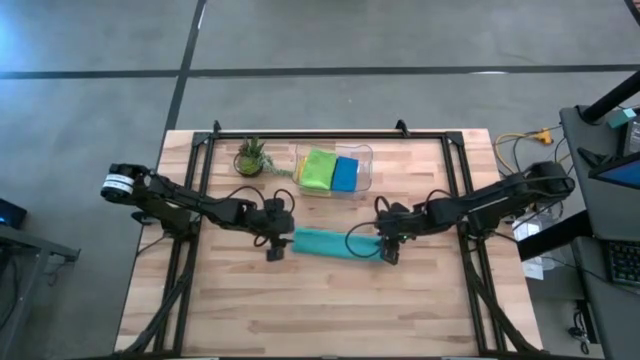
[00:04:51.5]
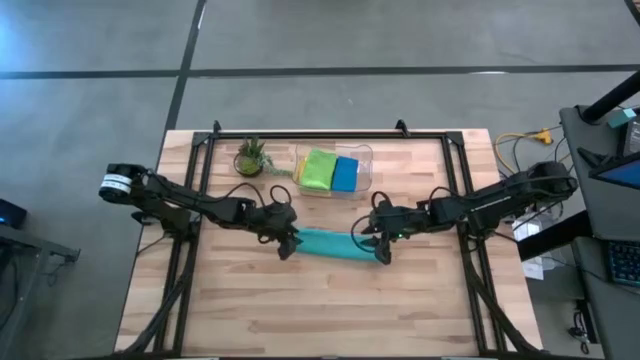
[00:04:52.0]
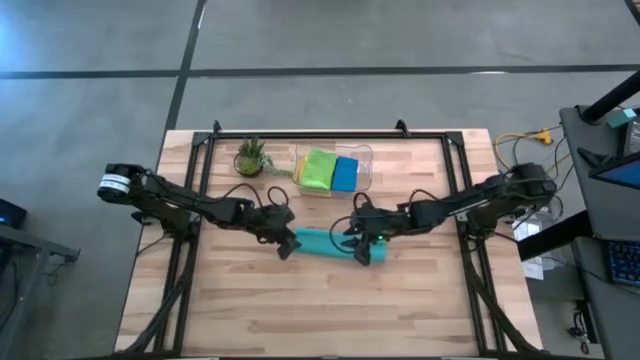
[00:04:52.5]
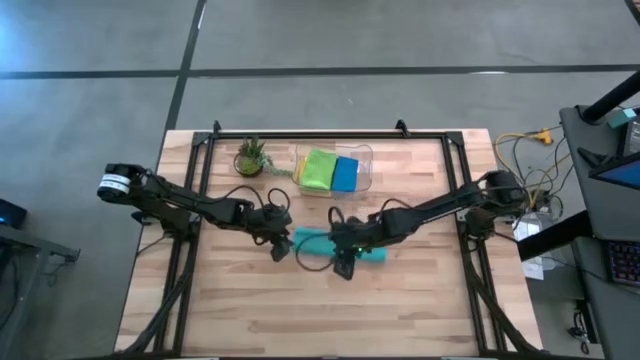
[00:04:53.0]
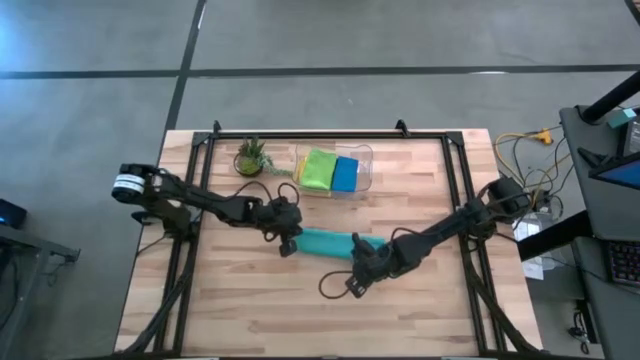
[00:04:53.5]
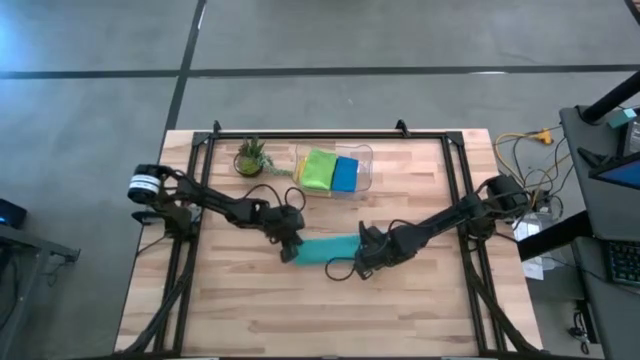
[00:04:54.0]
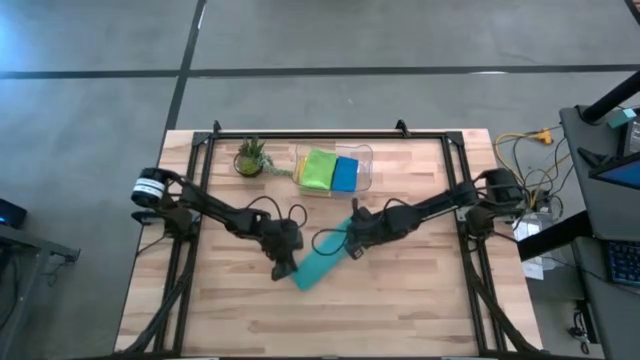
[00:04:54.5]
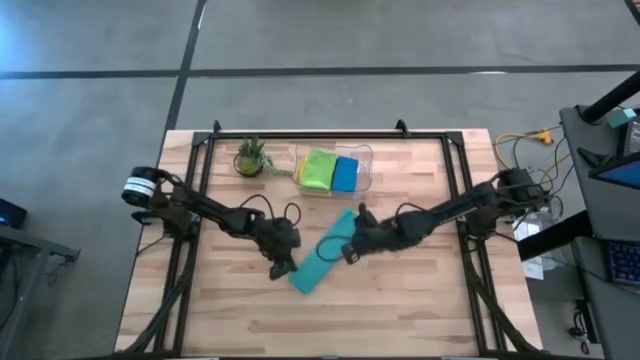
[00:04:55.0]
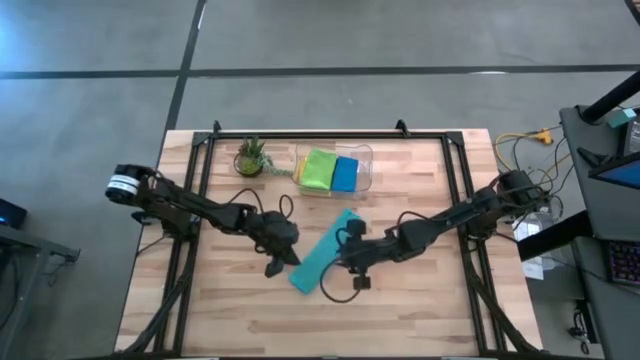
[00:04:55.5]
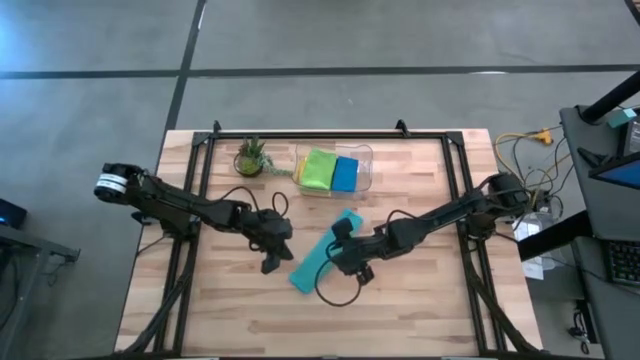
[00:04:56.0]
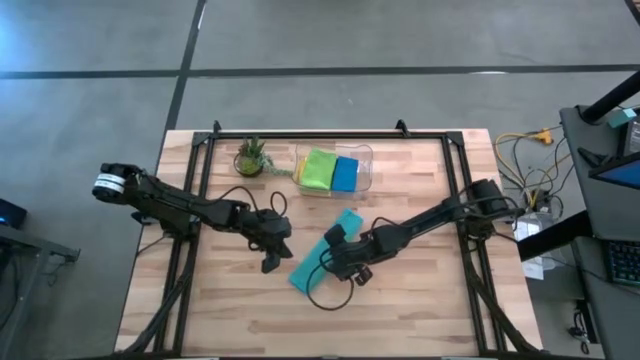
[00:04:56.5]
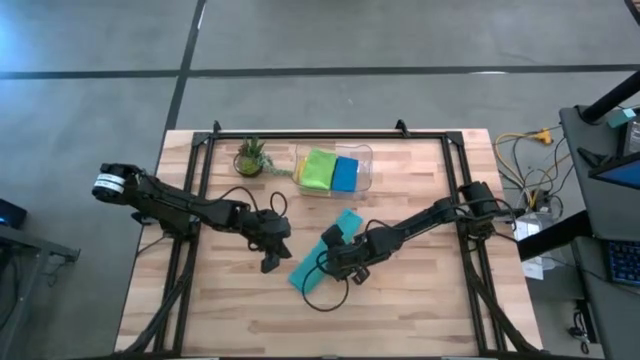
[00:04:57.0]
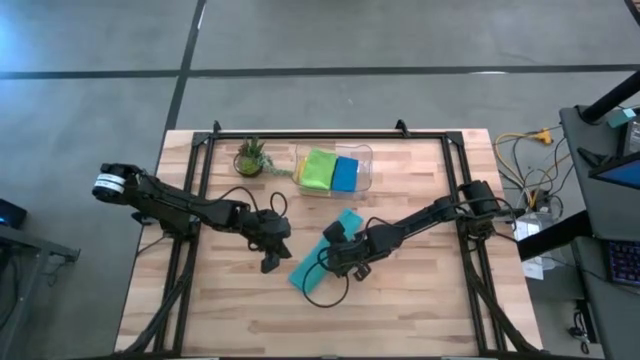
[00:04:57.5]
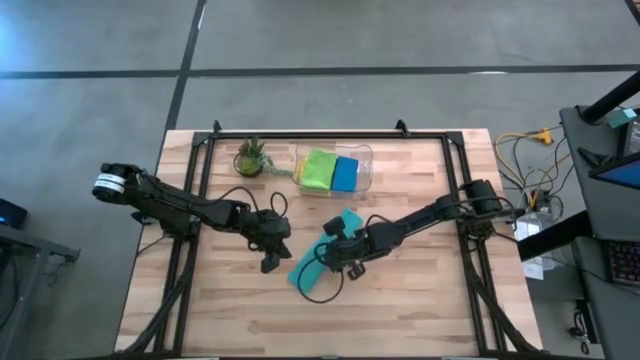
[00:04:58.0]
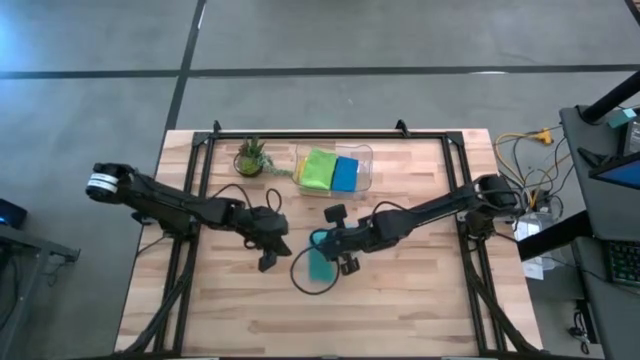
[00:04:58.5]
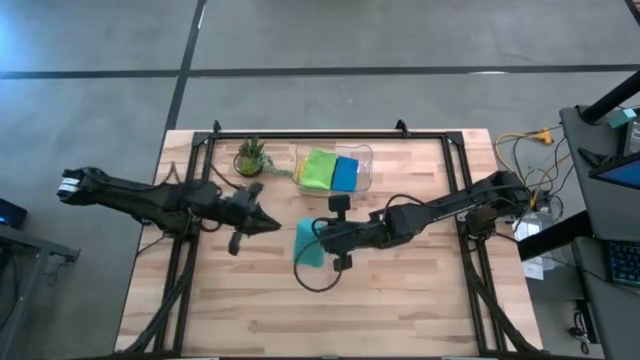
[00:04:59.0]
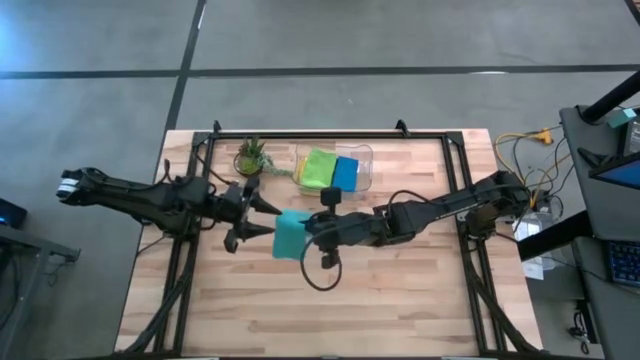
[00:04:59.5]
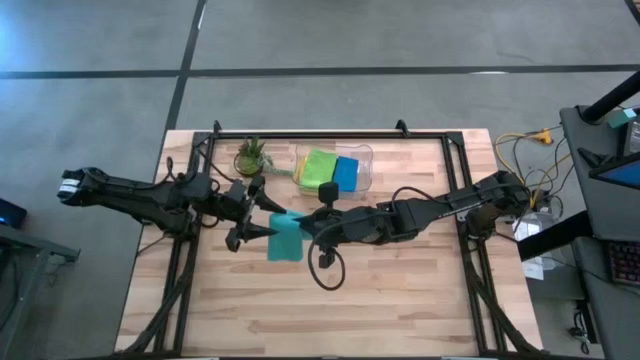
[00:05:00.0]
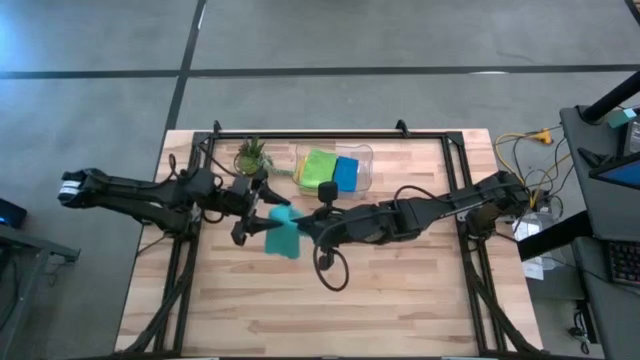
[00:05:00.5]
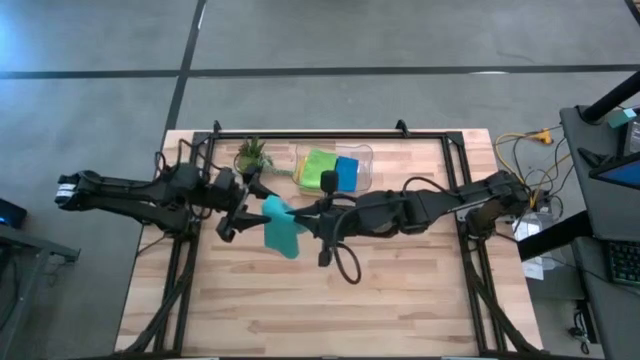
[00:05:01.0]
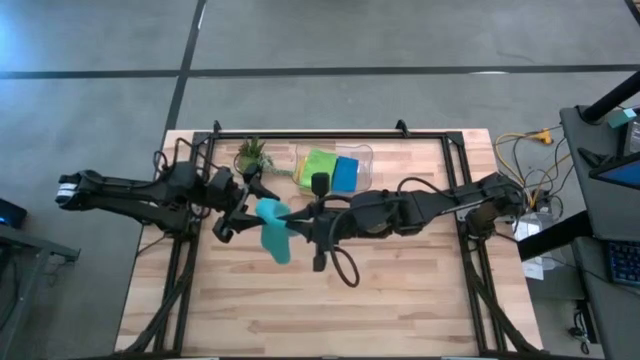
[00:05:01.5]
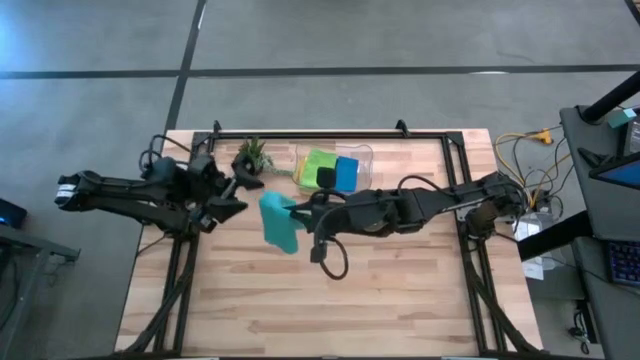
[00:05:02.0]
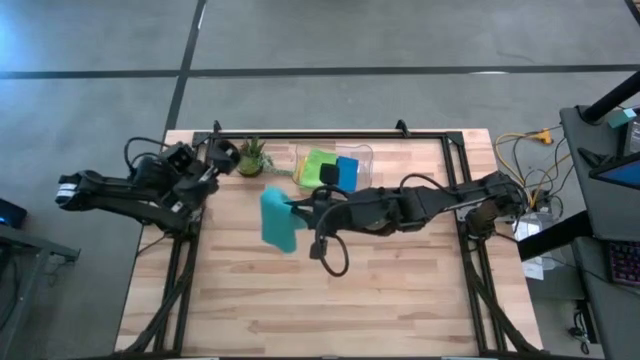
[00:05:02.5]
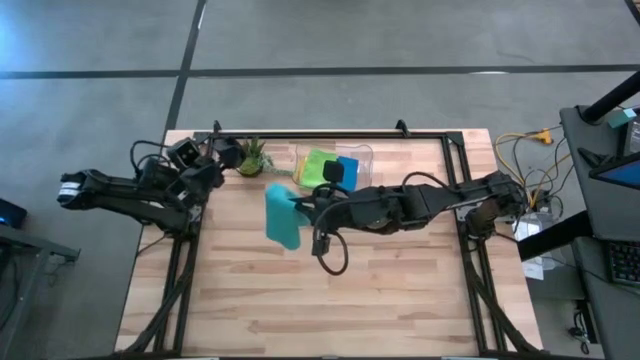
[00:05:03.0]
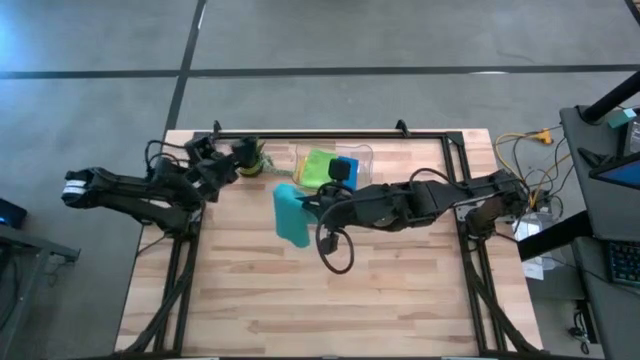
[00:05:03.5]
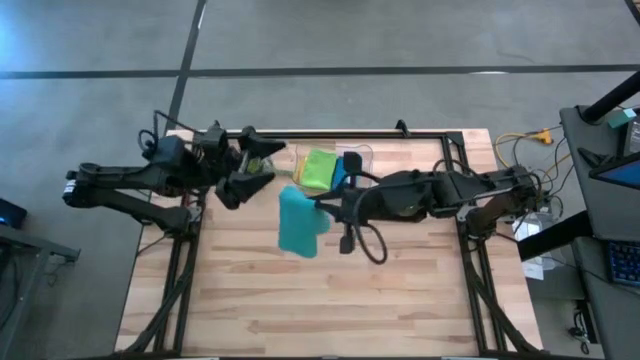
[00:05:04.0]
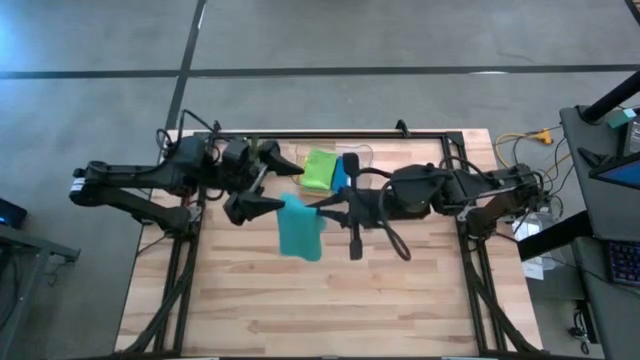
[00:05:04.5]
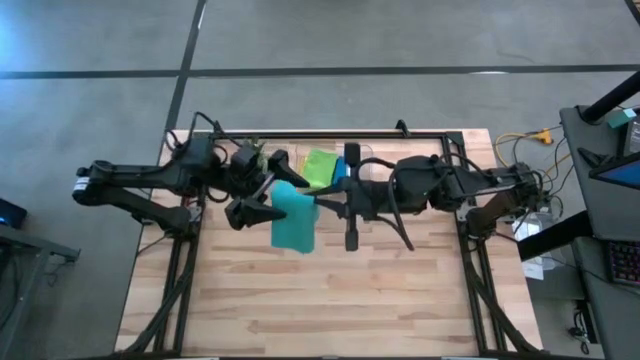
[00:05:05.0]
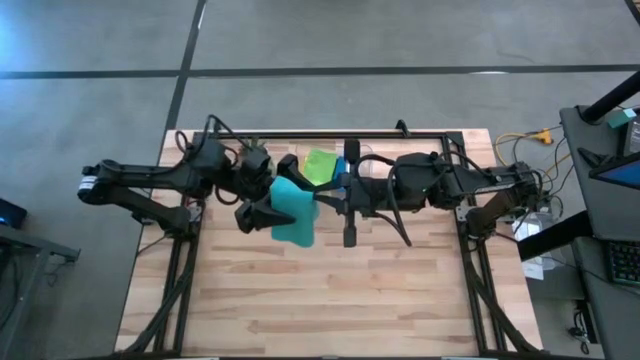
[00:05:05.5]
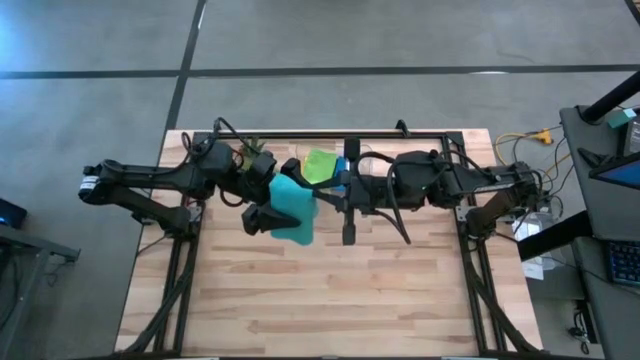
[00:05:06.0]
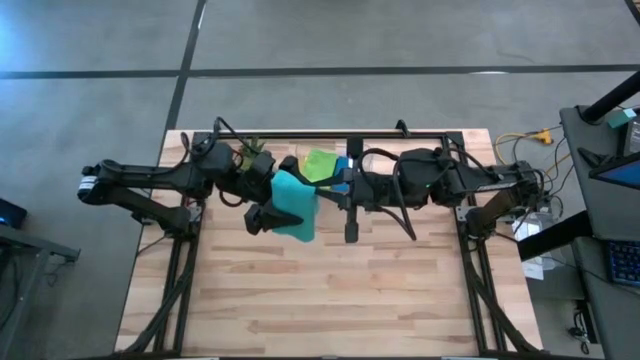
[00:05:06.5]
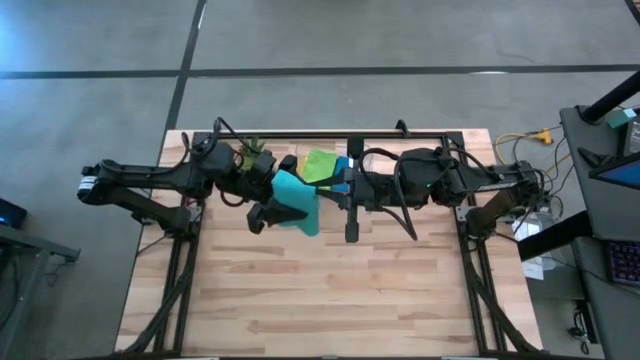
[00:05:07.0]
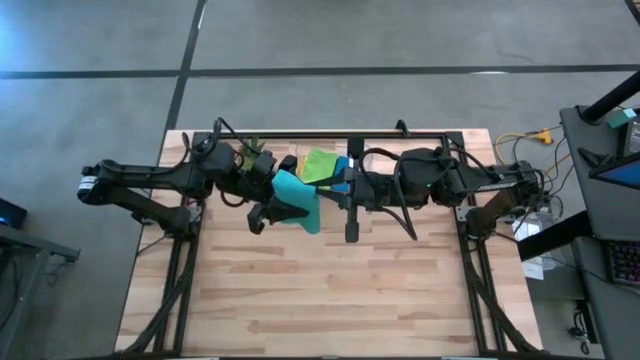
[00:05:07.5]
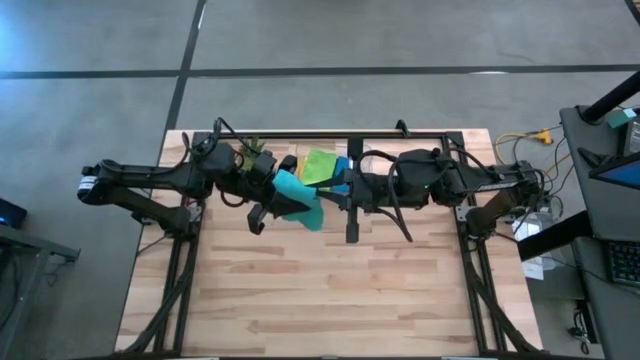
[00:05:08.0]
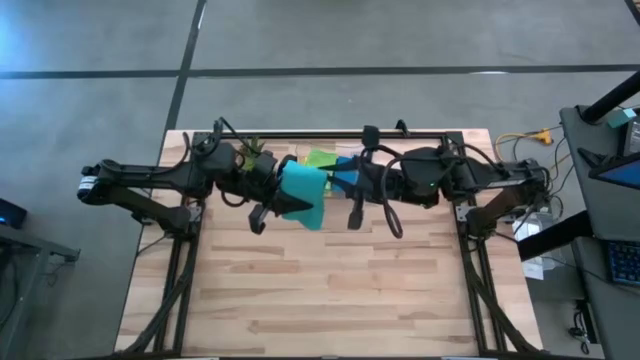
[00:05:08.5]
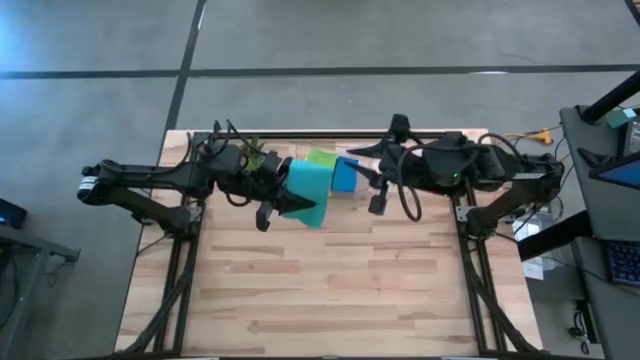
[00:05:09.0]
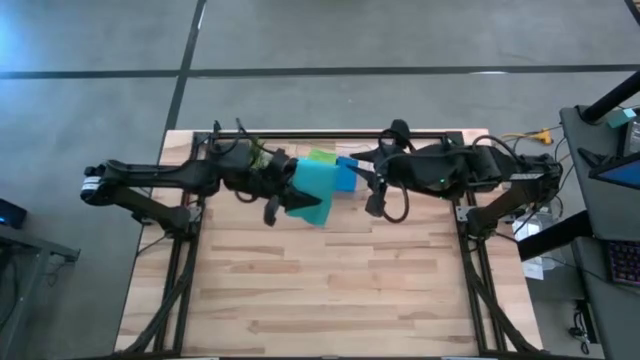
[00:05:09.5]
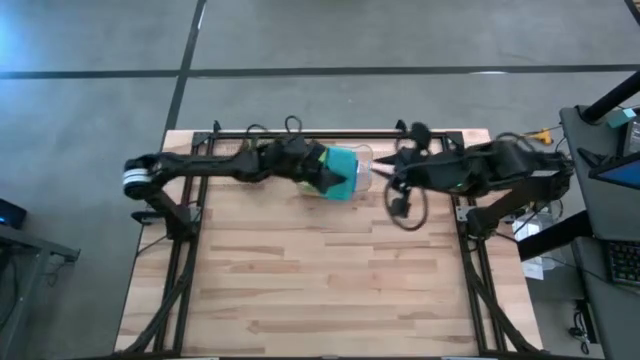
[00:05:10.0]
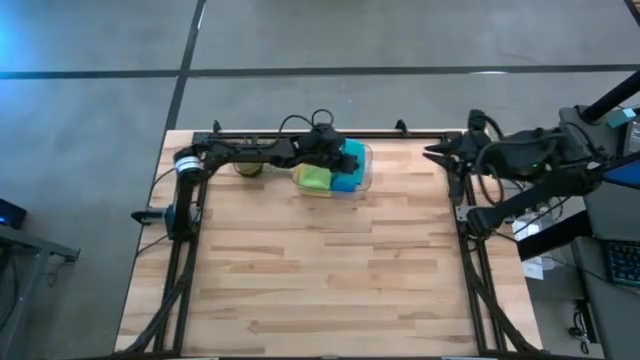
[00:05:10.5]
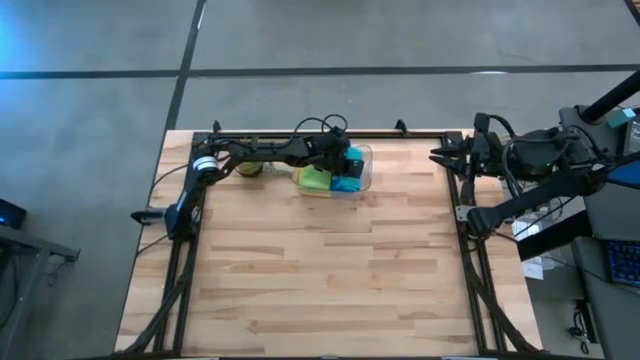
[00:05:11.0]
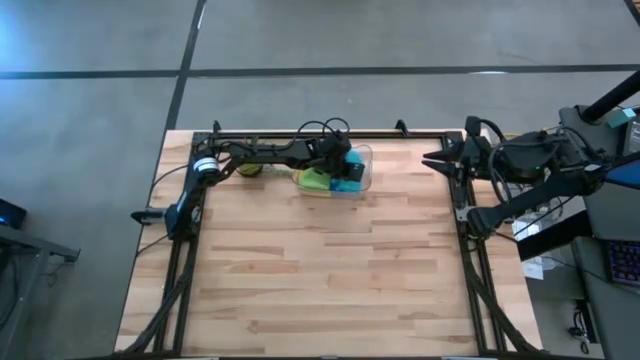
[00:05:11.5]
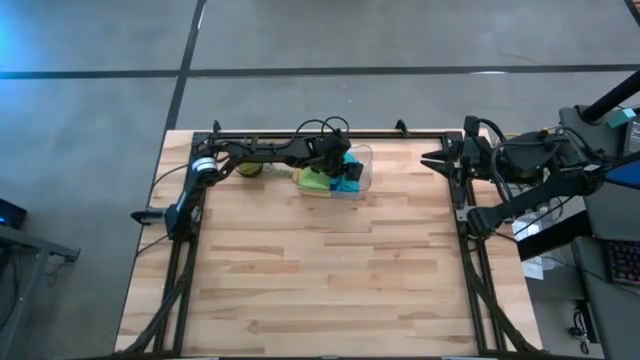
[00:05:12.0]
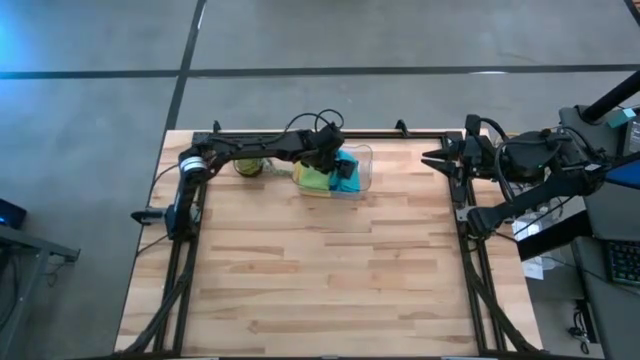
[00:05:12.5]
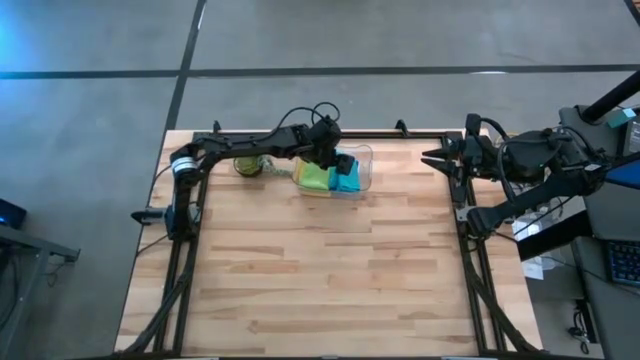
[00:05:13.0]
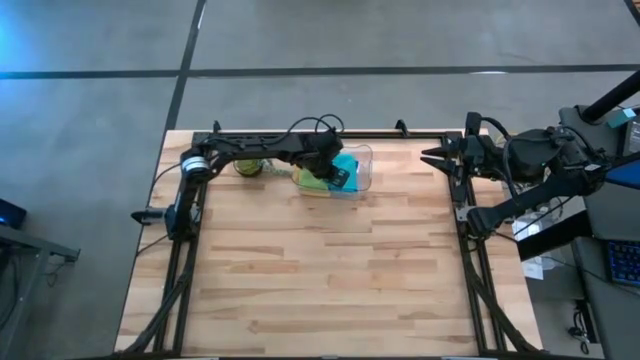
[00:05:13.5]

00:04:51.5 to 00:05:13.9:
Task: Fold microfiber towels
Put the light blue microfiber towel into the transparent bin
